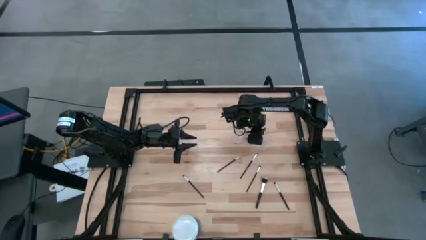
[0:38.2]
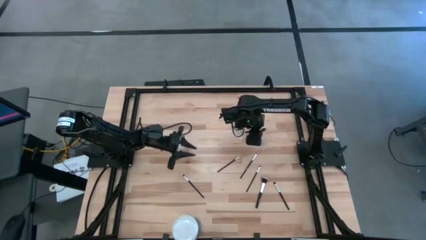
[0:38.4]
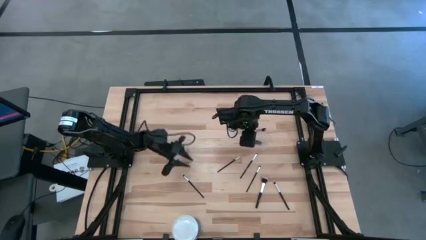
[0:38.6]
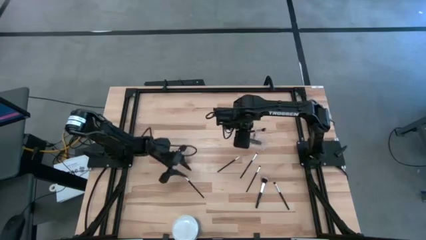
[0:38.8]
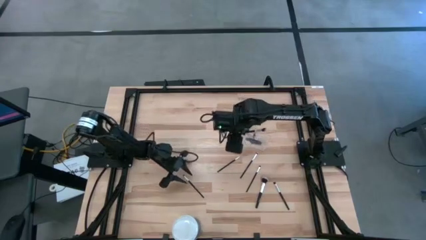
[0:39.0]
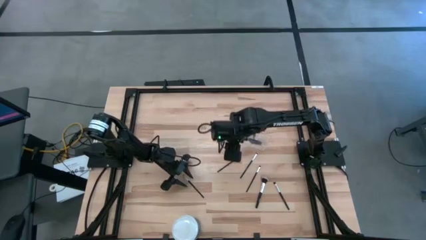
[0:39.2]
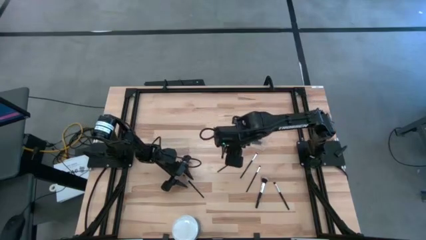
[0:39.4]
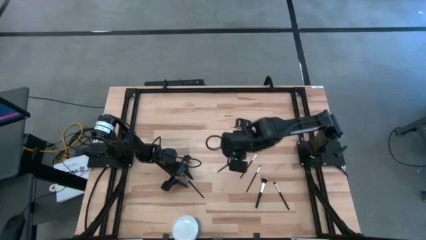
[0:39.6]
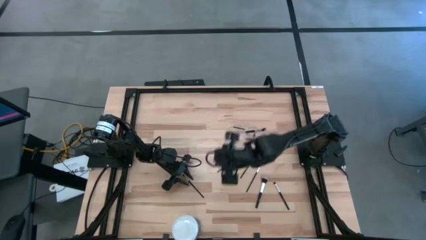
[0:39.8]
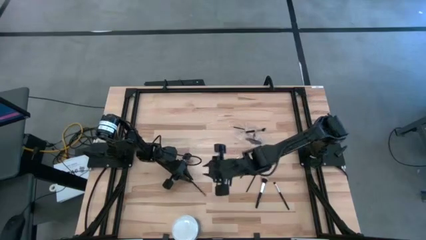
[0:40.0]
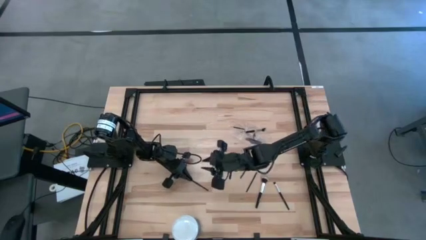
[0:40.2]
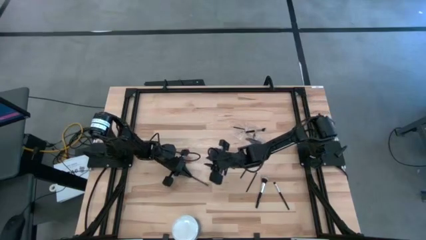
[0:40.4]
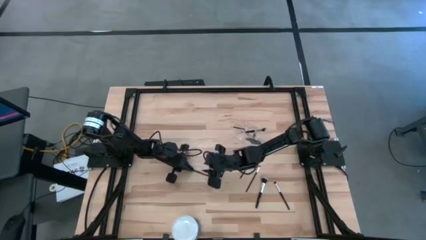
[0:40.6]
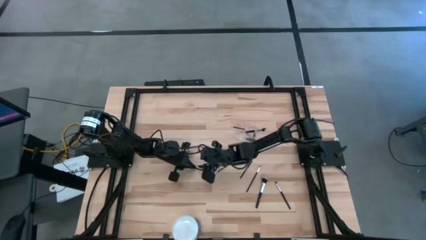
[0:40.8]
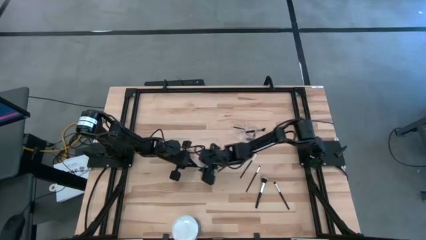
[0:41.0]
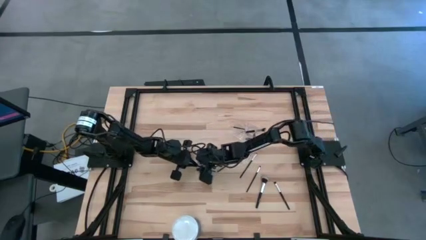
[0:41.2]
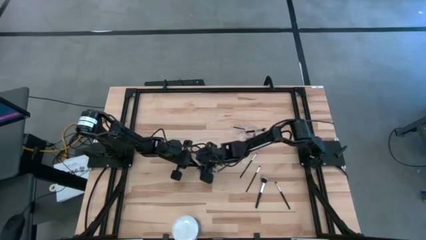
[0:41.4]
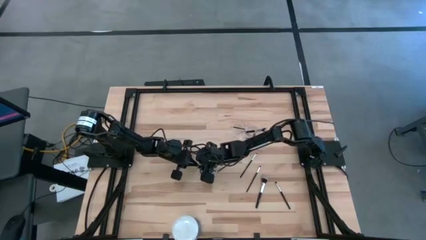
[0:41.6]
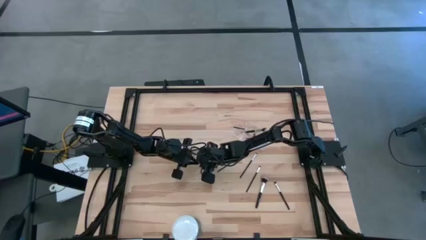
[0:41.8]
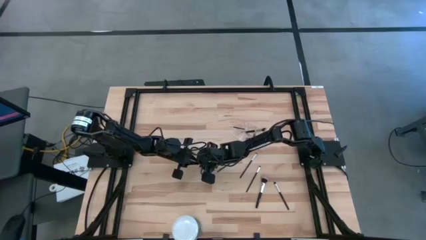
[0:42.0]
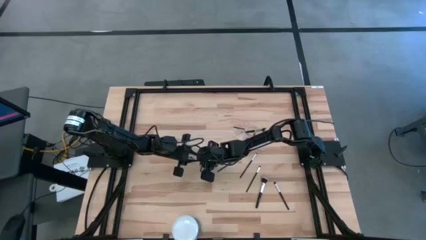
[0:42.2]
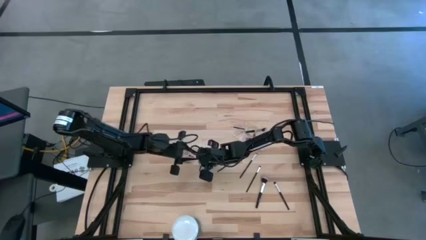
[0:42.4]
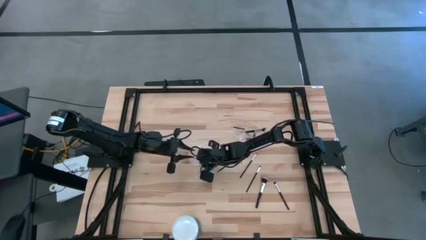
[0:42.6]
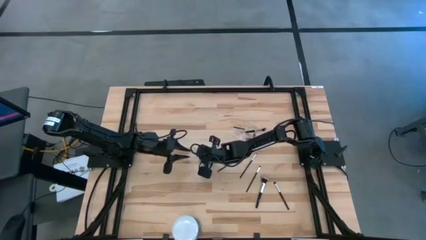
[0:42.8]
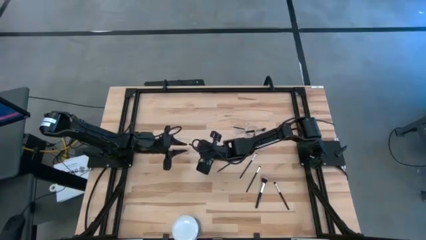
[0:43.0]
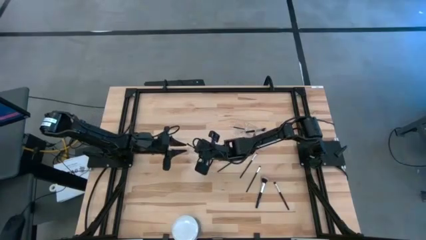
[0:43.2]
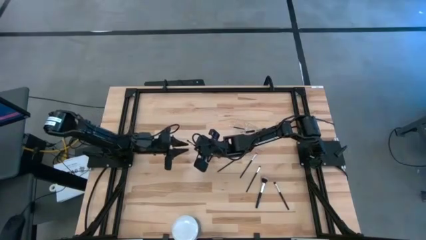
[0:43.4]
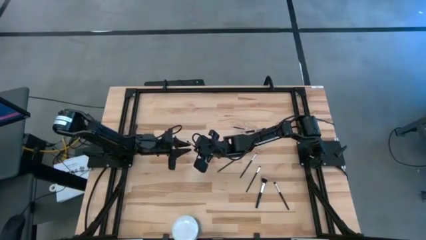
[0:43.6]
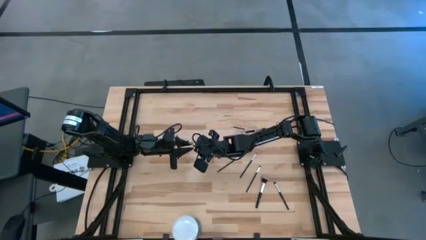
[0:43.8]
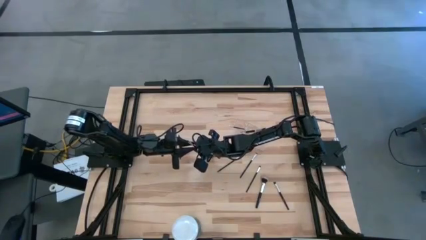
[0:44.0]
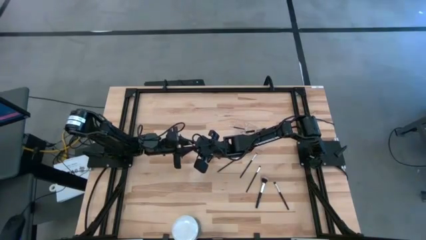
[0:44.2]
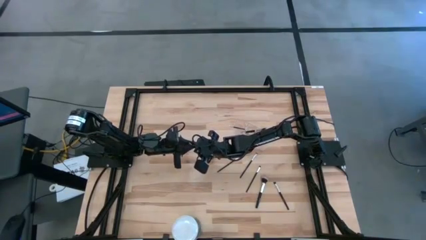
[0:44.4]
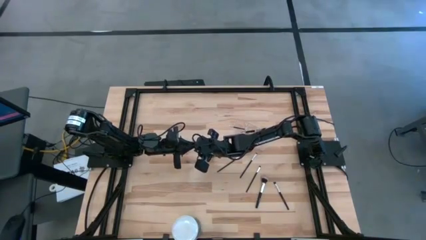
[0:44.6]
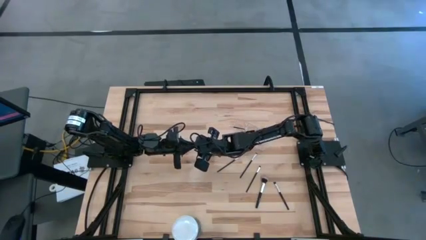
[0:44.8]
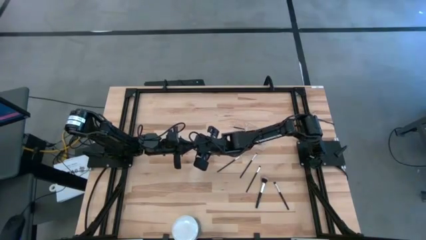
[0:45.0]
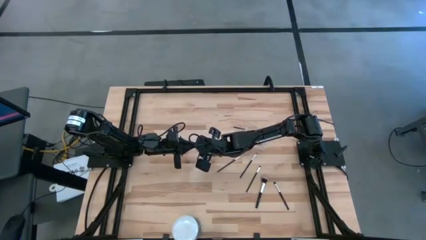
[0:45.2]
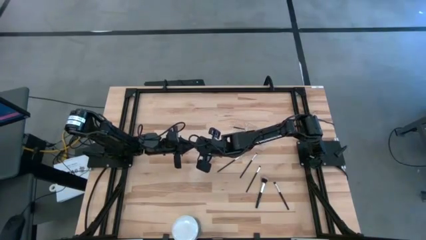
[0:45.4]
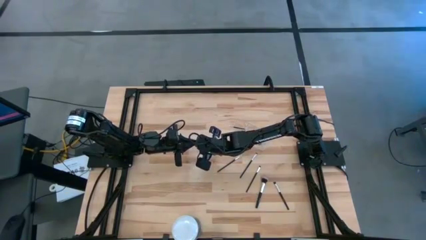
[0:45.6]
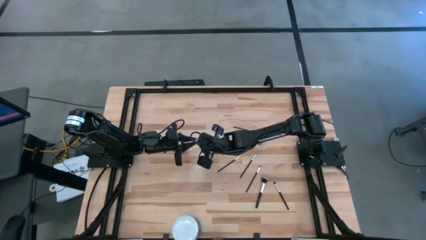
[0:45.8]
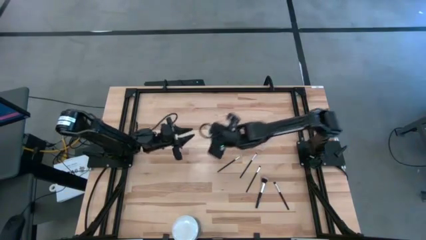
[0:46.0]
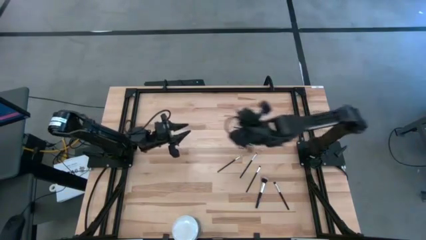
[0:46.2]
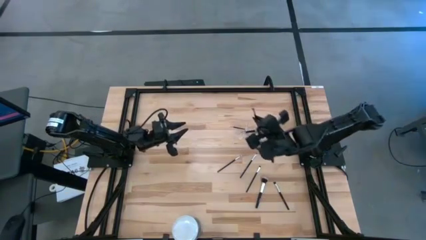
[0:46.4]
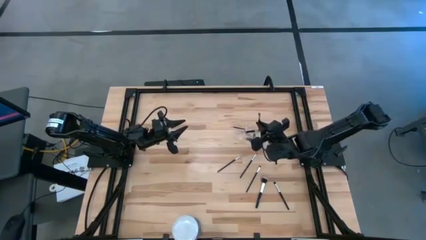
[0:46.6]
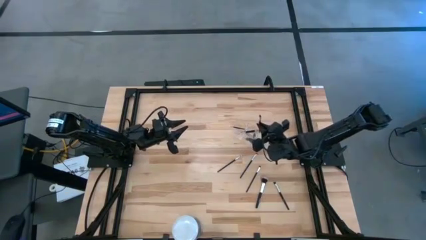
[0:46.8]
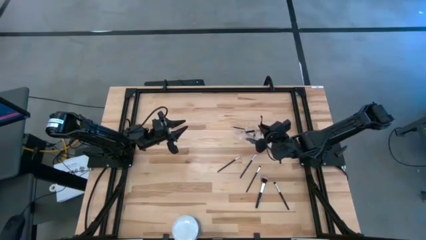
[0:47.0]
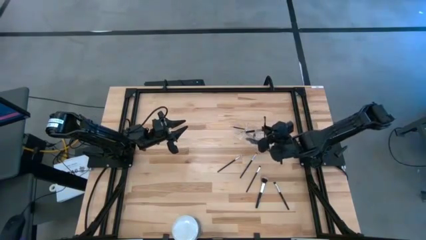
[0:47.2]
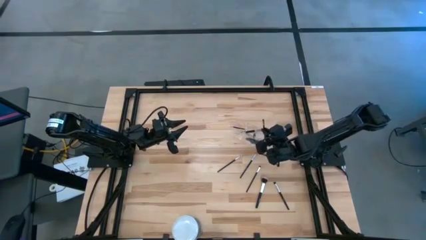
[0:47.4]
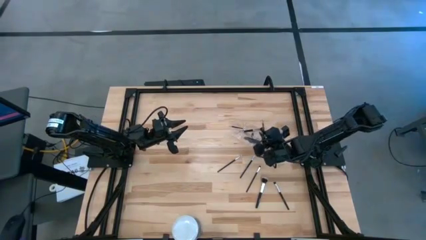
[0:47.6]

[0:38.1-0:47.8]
Task: Pick & Place Makeup Brushes
Put the black eyeshadow brush into the makeup organizer

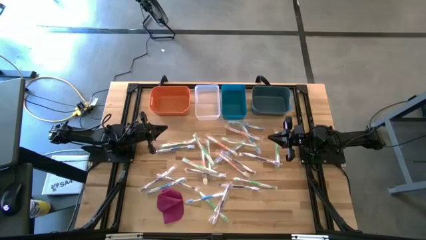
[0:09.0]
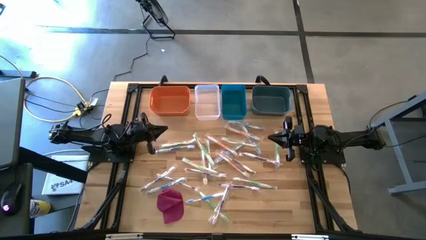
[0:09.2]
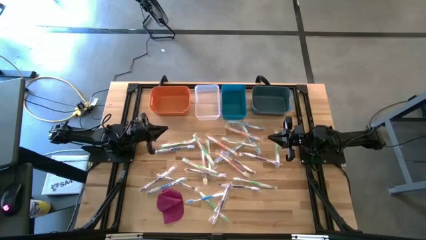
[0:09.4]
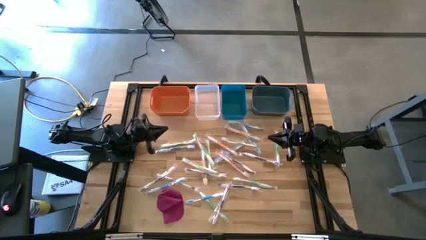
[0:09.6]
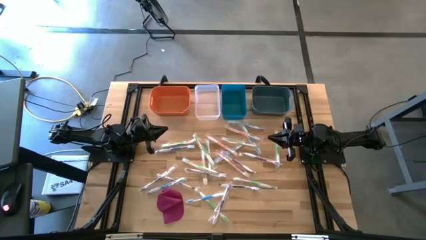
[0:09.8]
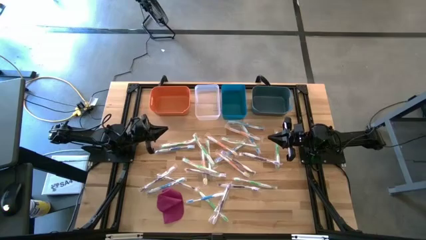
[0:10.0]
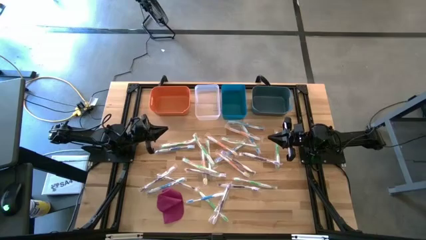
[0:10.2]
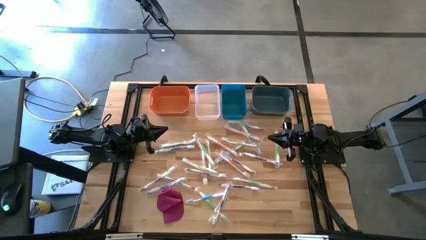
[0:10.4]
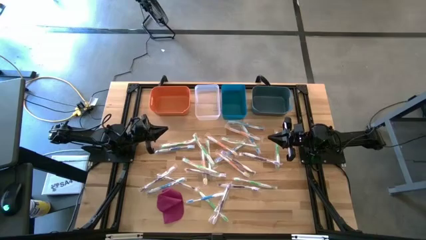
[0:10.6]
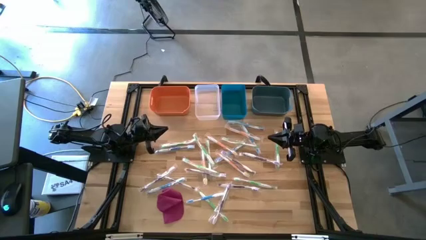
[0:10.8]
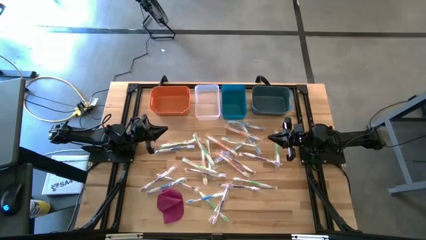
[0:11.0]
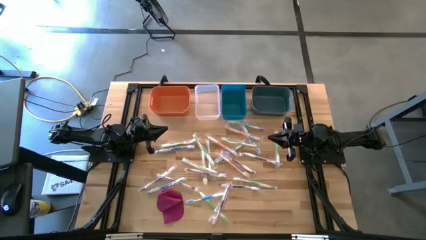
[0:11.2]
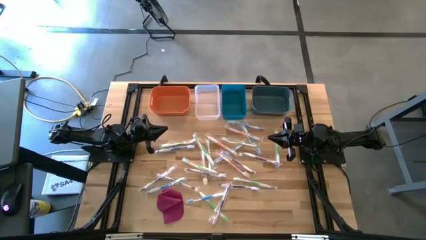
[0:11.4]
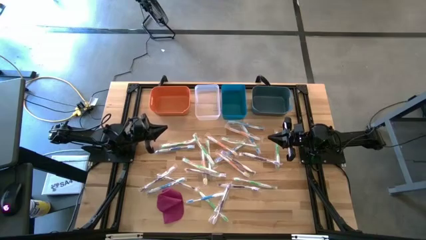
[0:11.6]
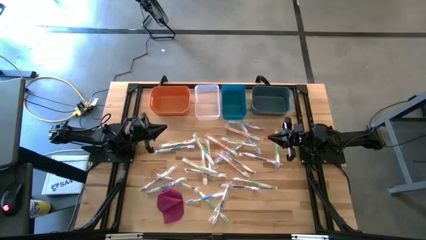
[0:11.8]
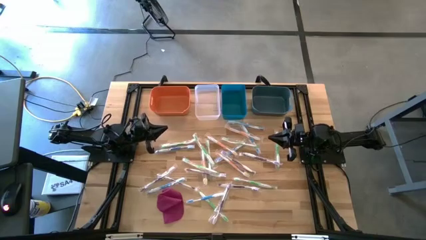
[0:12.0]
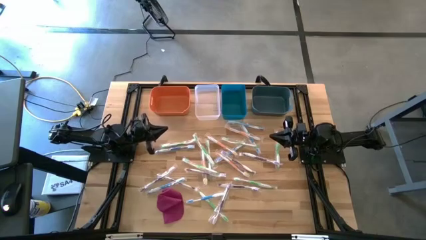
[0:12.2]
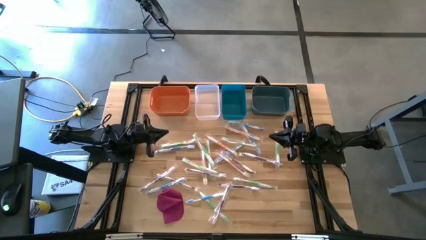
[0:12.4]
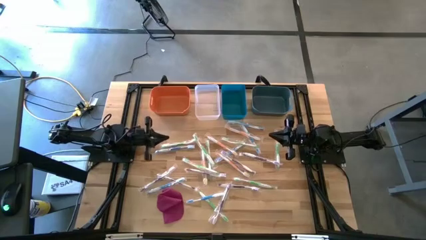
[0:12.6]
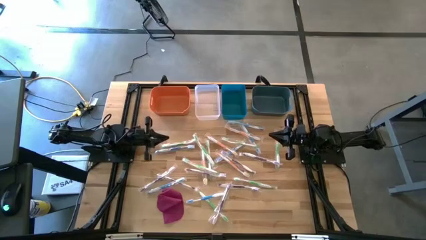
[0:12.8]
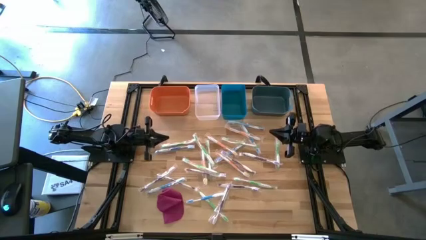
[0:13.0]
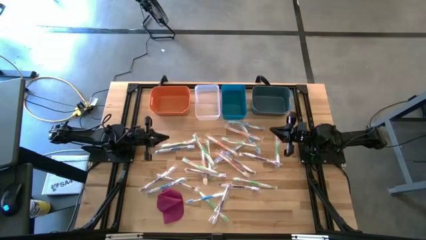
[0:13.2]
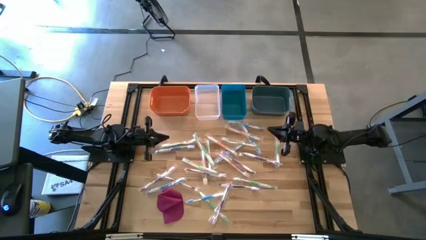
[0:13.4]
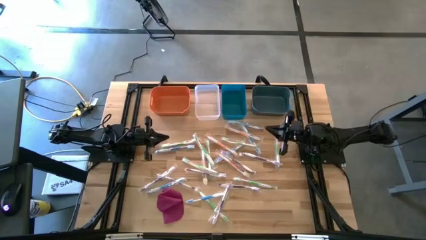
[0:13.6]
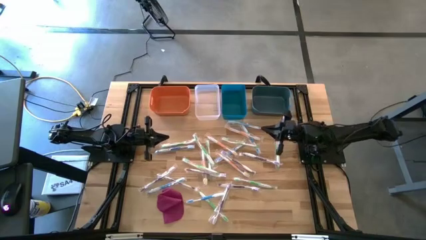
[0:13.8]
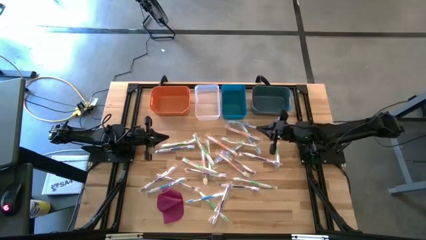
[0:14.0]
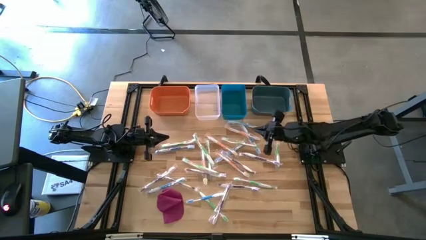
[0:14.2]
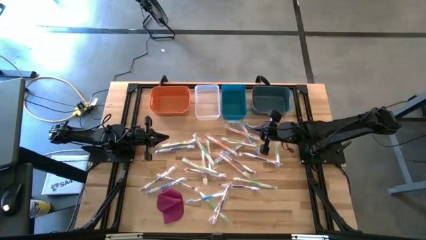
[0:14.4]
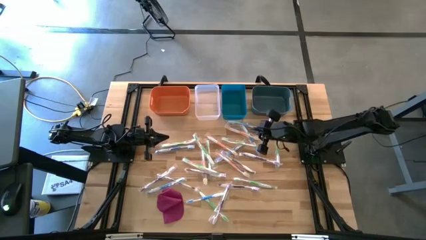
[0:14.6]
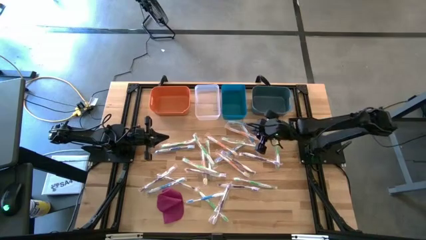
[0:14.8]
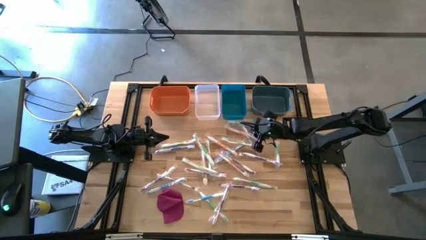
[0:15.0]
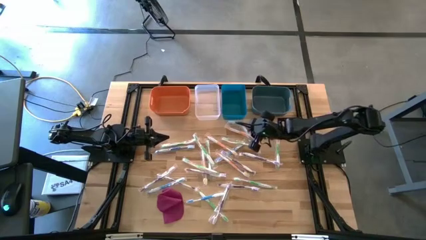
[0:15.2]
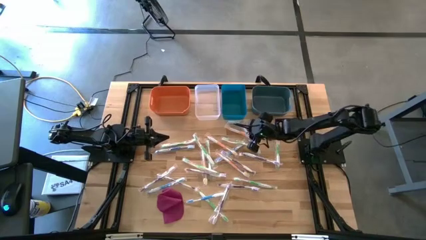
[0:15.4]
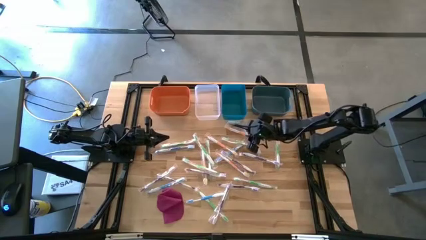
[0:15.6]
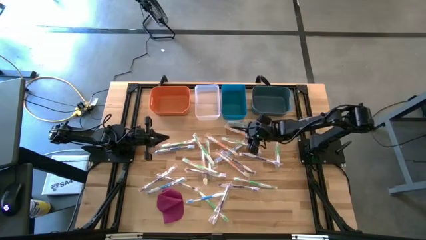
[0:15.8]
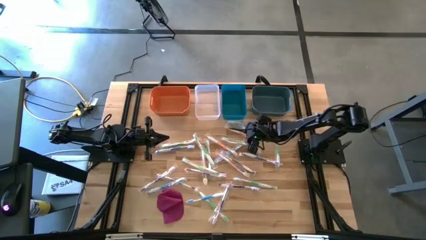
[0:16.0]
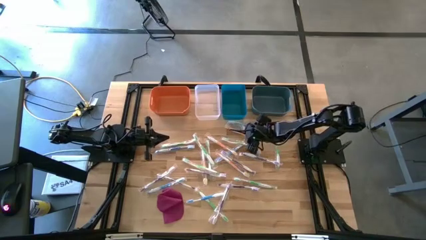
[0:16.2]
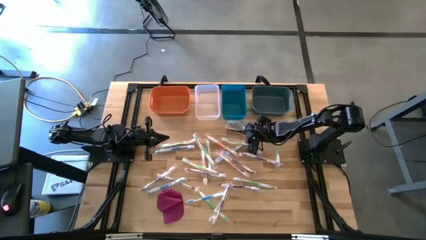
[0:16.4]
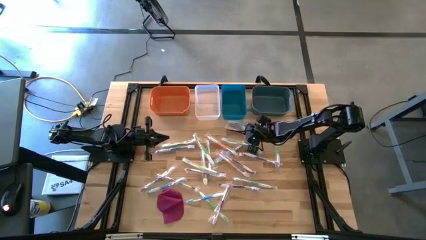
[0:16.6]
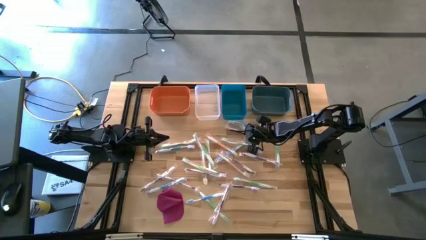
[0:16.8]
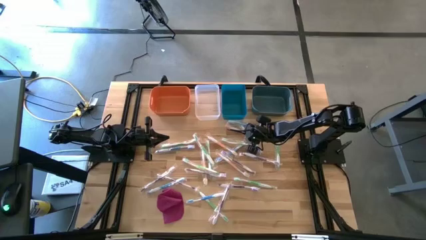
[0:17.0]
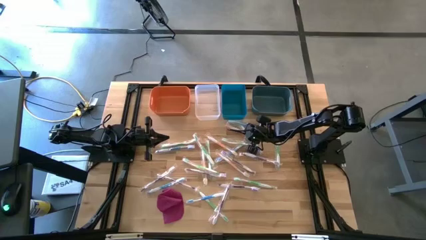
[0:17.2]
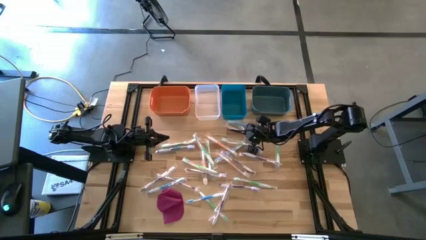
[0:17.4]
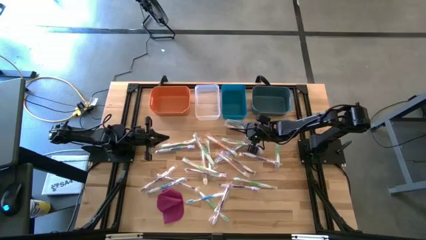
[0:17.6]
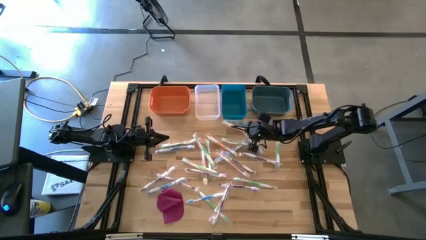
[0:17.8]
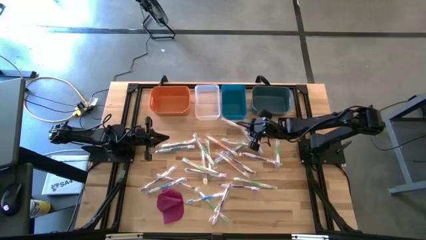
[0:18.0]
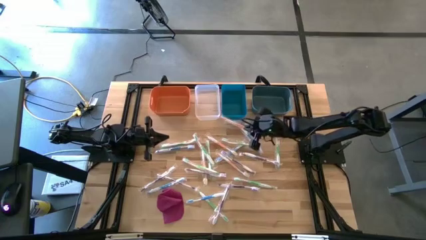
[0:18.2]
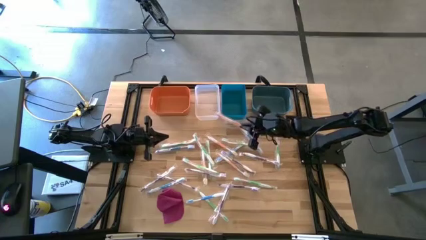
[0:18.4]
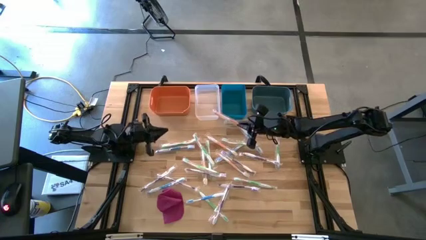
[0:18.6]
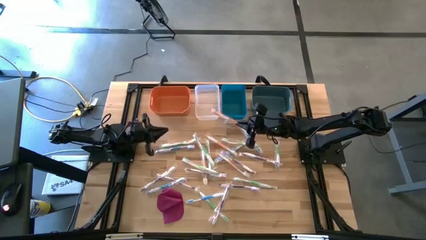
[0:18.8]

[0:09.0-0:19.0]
Task: Pick & Place Toothbrushes
Put the orange toothbrush into the orange bin
